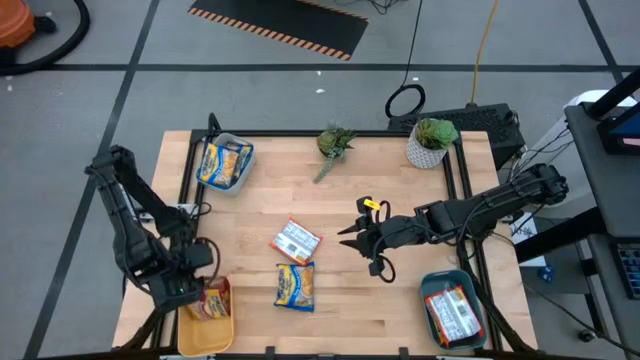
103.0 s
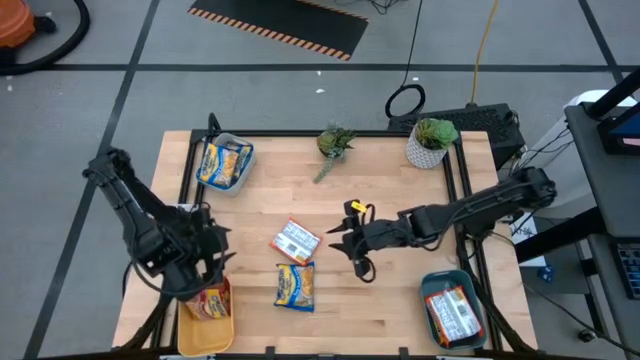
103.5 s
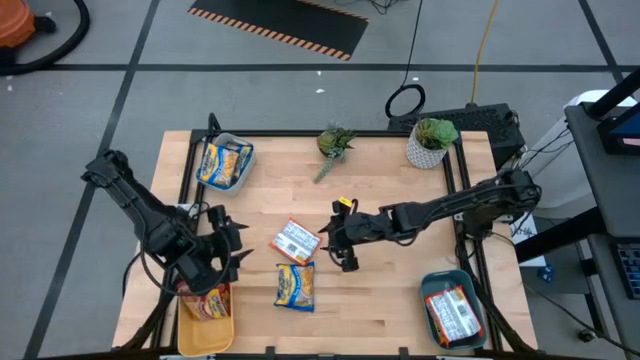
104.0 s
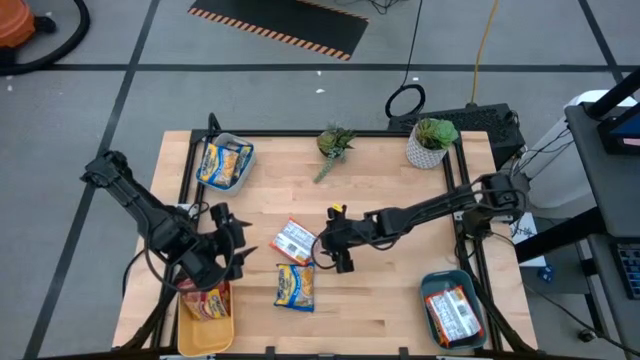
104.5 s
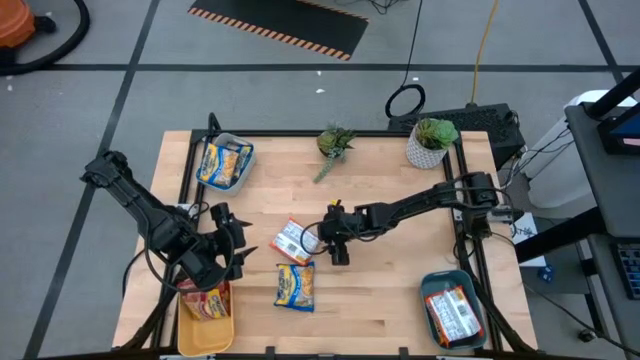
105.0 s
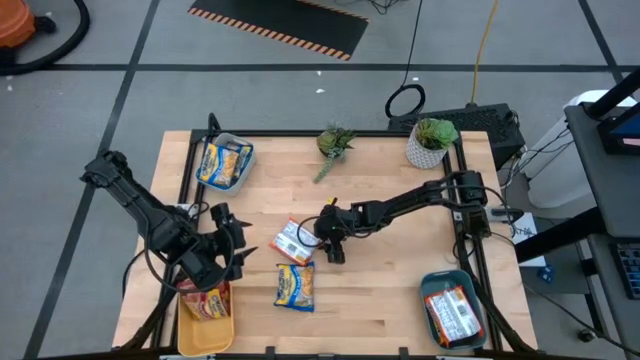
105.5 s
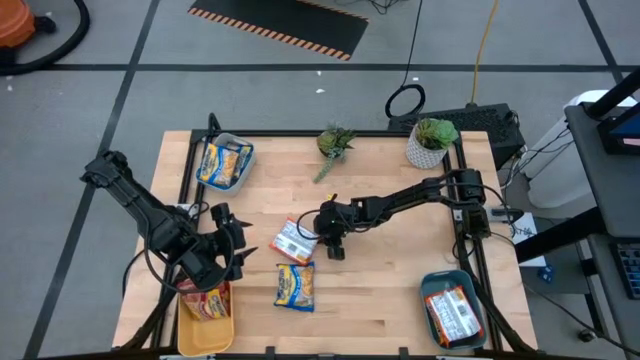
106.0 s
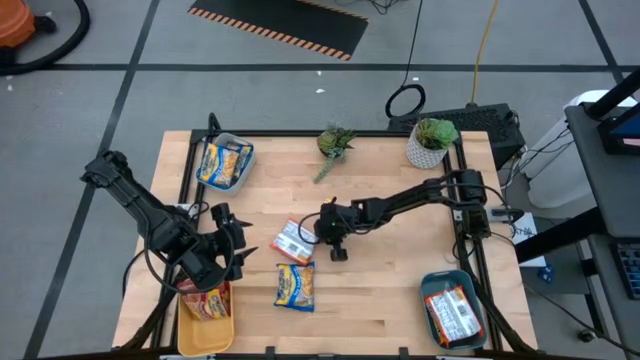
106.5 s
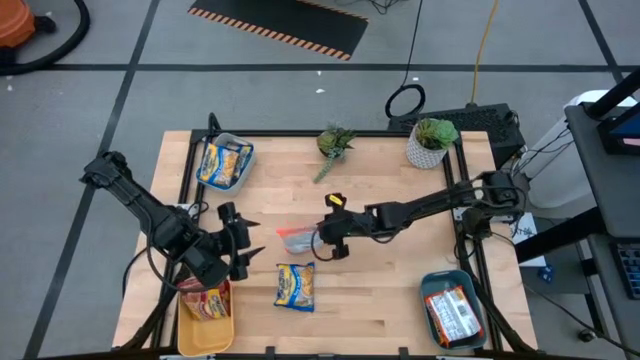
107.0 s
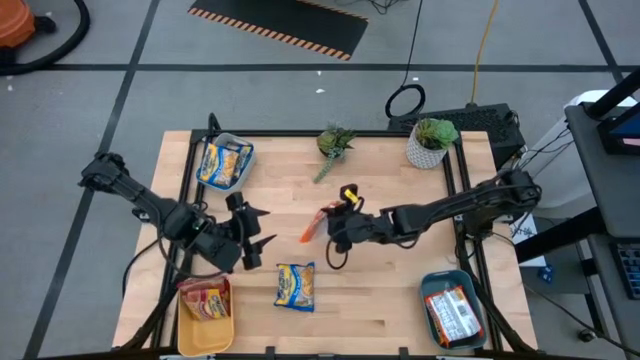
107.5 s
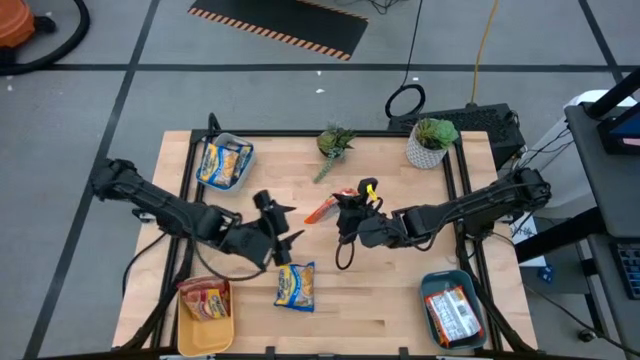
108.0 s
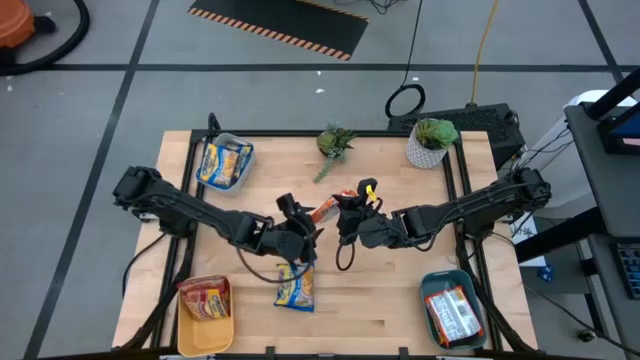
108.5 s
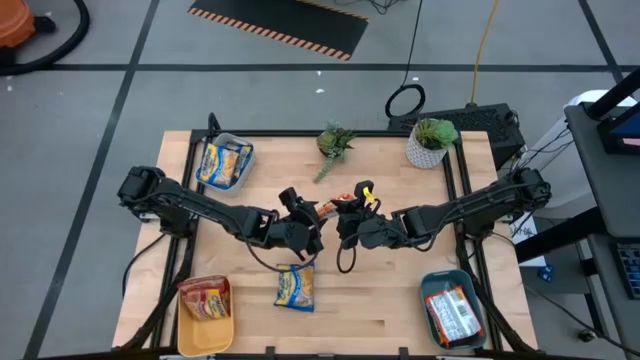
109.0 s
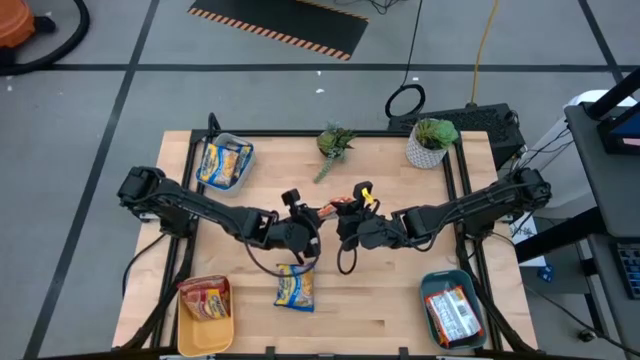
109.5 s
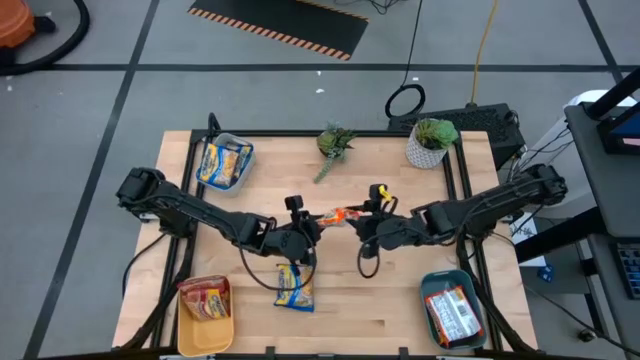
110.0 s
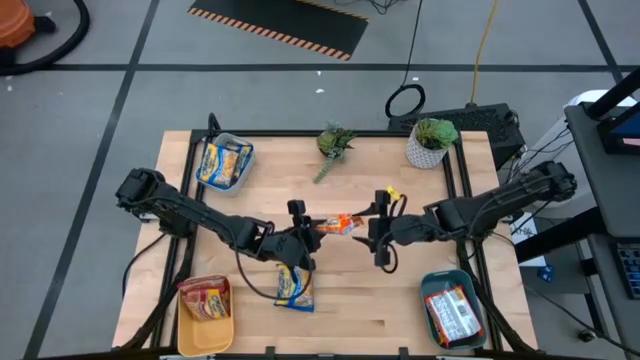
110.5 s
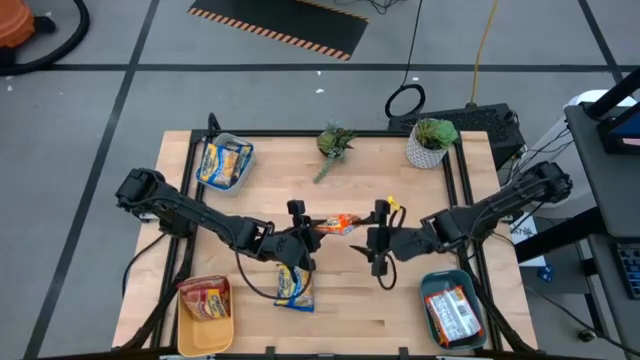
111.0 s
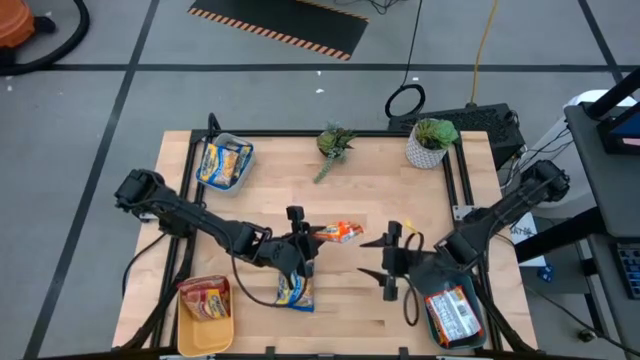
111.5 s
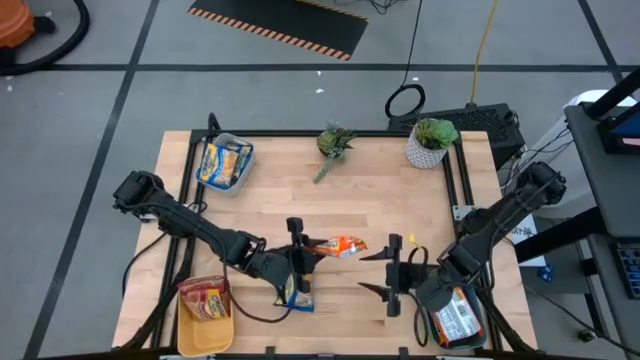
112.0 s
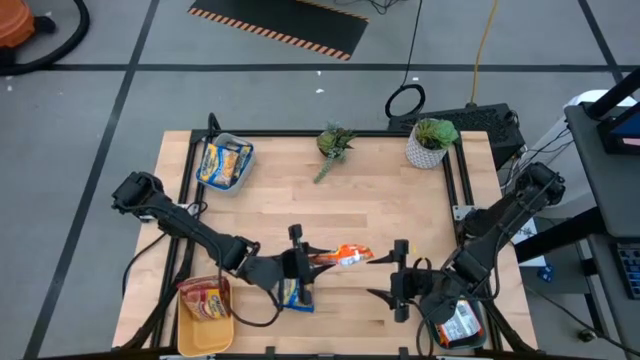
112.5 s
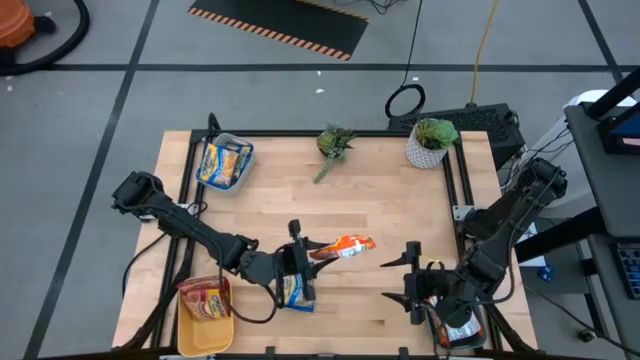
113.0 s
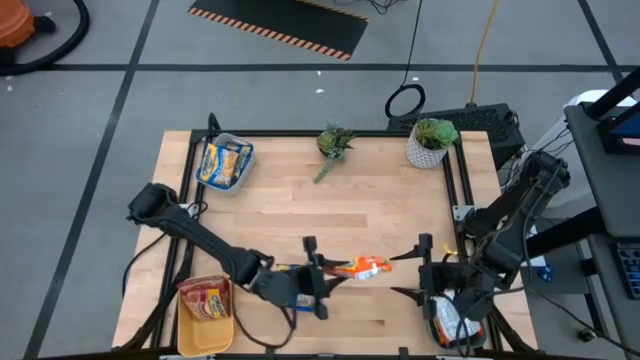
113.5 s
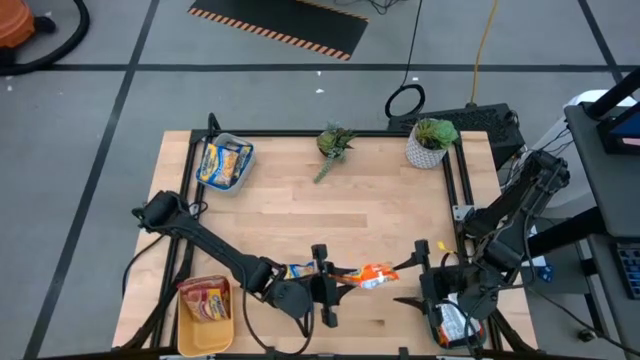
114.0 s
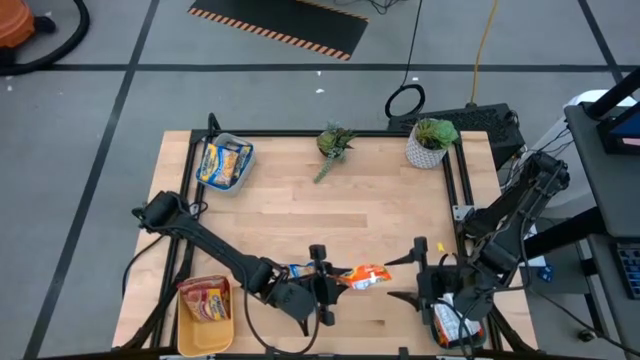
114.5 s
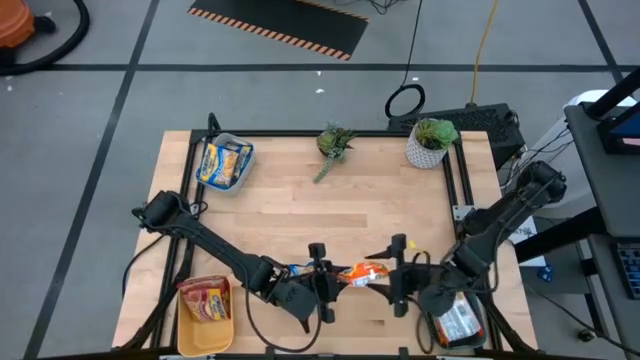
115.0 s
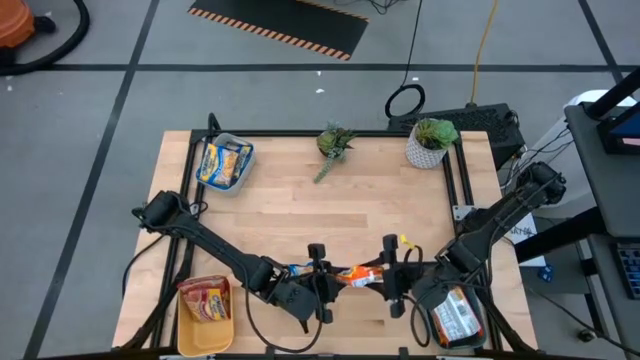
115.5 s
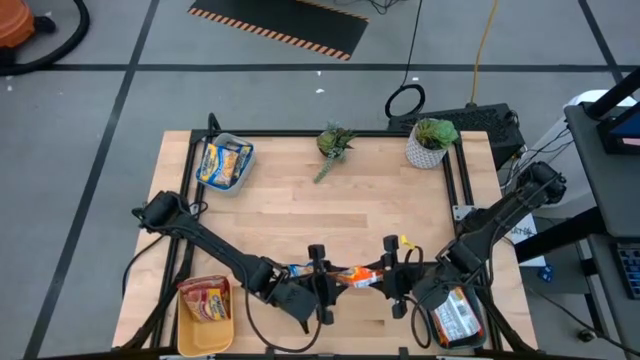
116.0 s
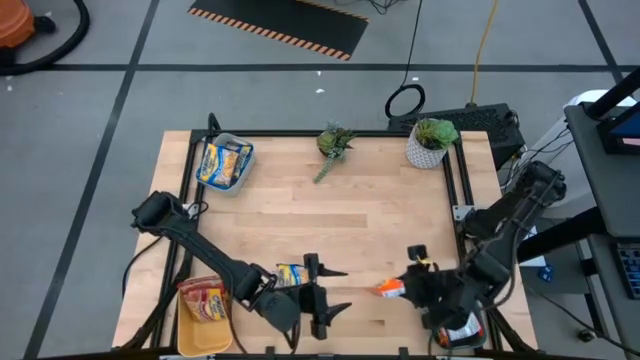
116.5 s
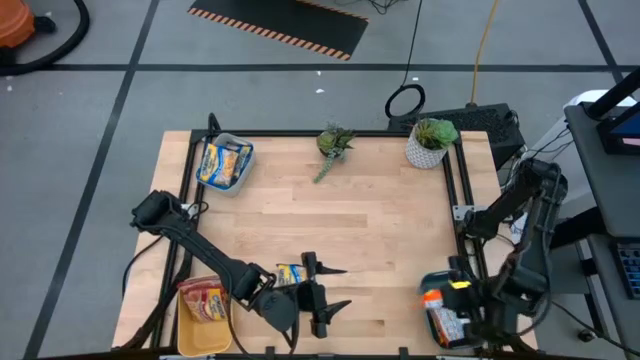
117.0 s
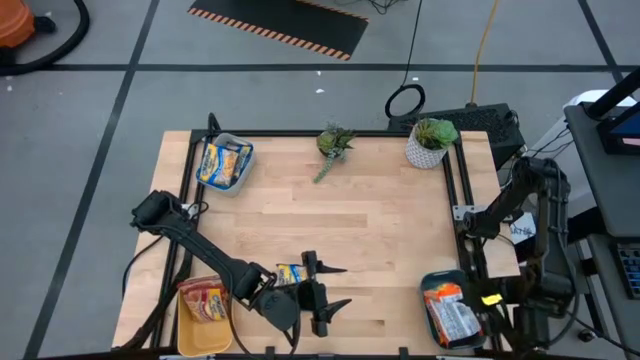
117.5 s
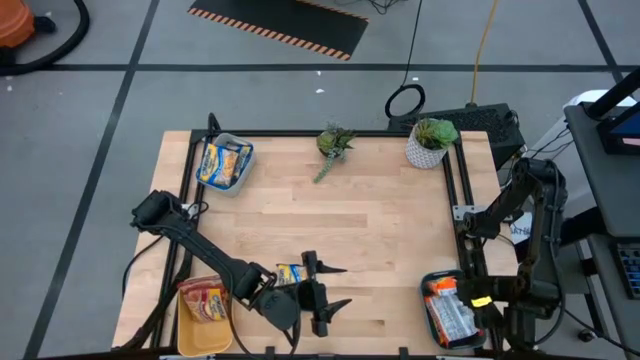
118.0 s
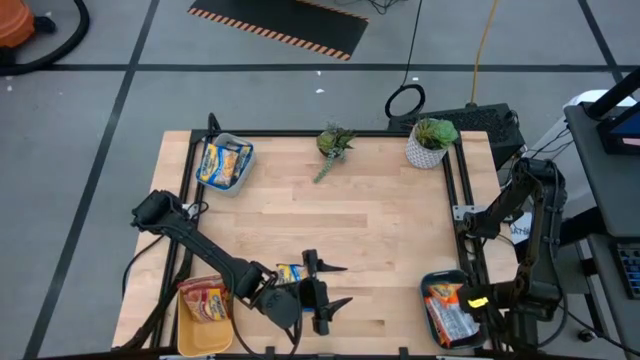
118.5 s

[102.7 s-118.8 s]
Task: Sort Maruchan noodles
Put the orange noodle pack into the blue bin

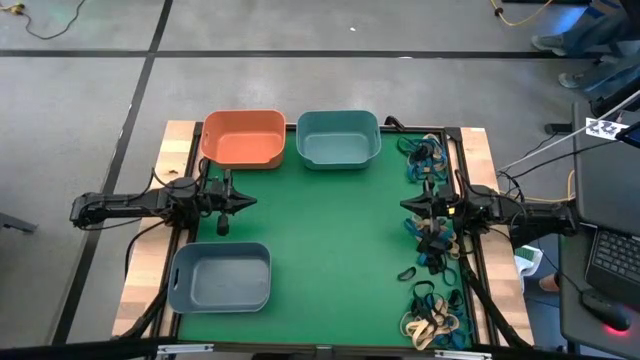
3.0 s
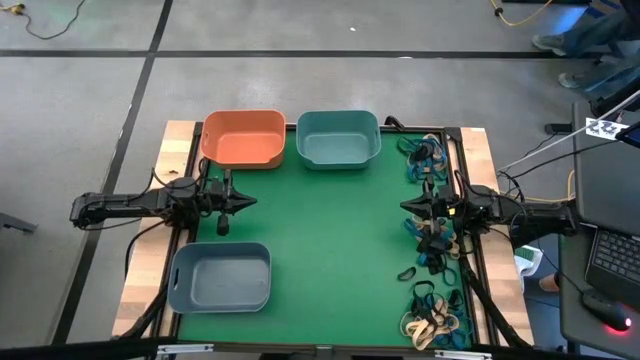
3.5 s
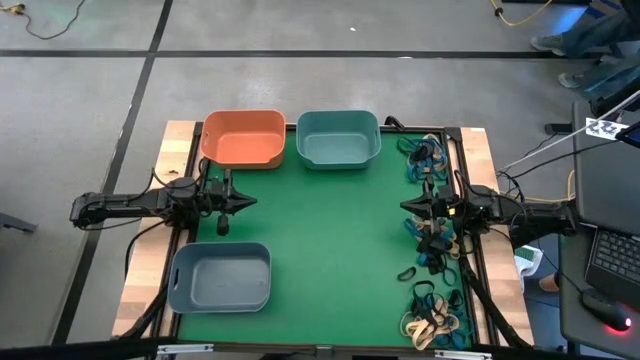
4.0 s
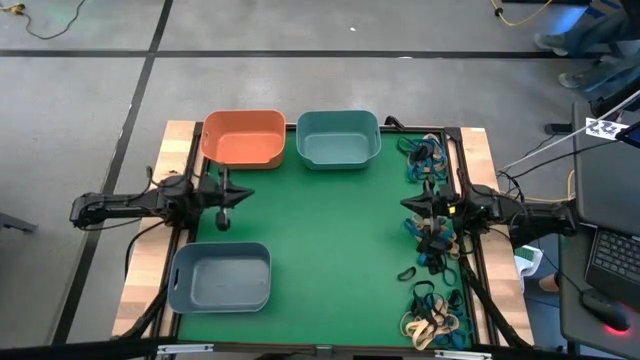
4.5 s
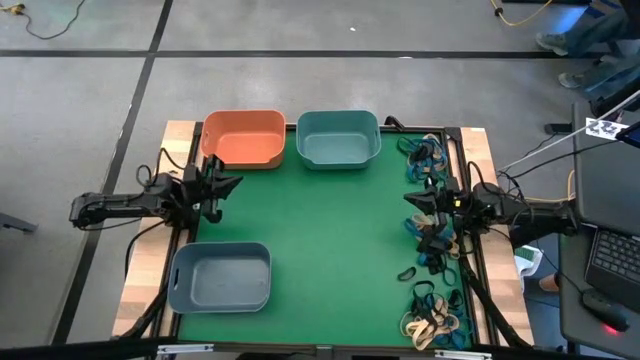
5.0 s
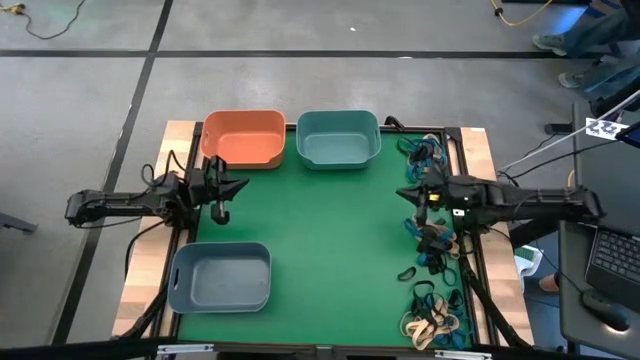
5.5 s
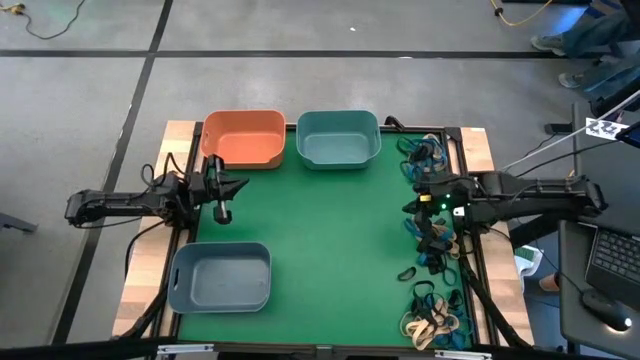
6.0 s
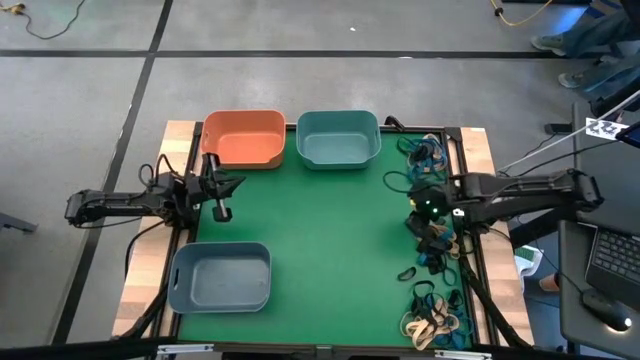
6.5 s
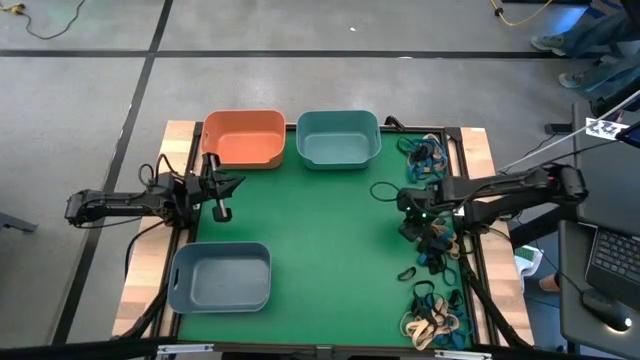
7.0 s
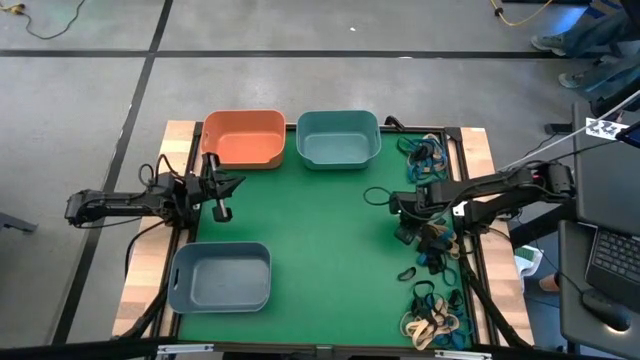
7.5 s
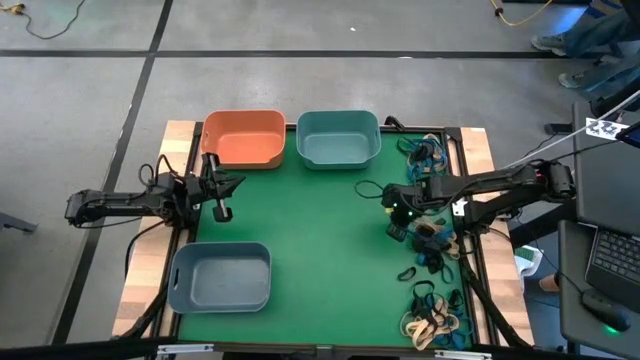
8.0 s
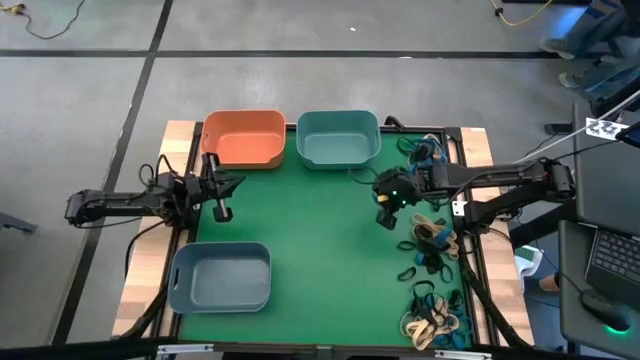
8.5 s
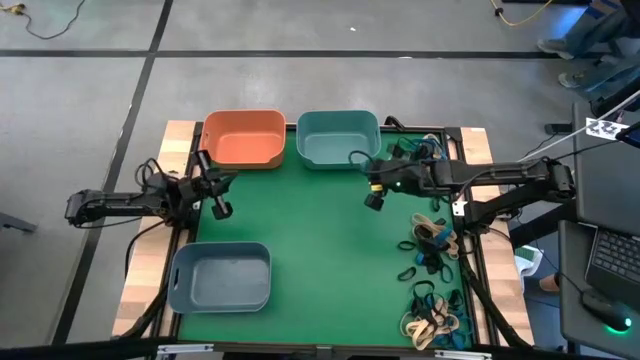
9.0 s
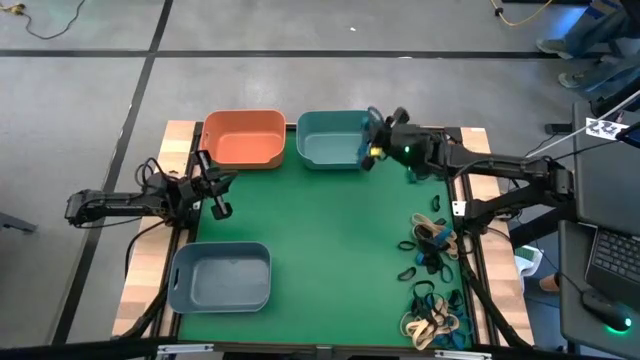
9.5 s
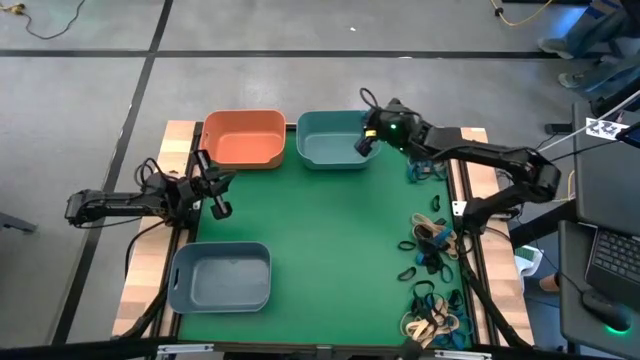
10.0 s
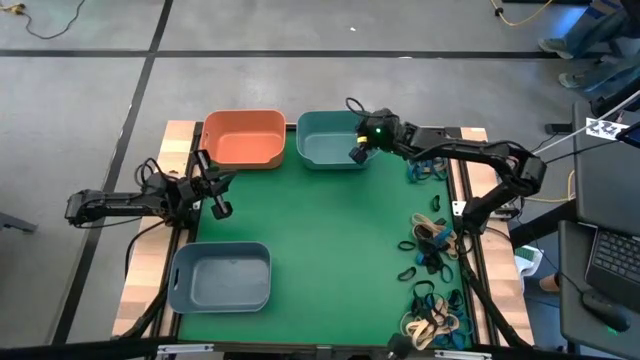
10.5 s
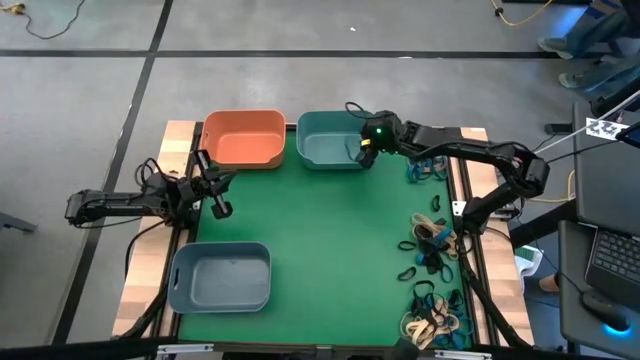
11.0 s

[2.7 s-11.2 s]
Task: Sort rubber bands into baskets
Put the blue rubber band into the green bin
